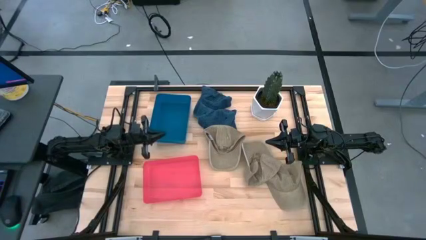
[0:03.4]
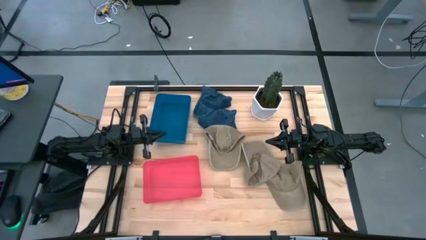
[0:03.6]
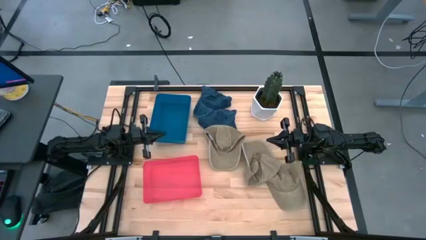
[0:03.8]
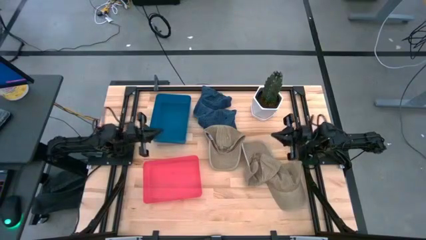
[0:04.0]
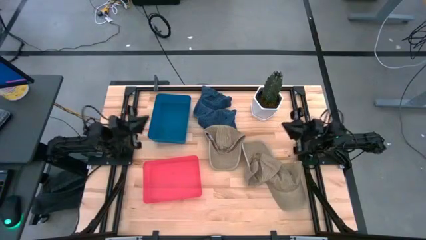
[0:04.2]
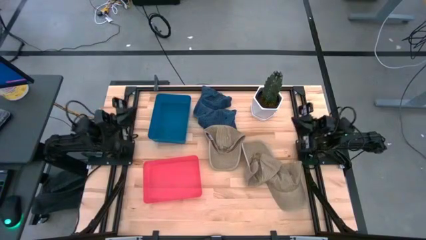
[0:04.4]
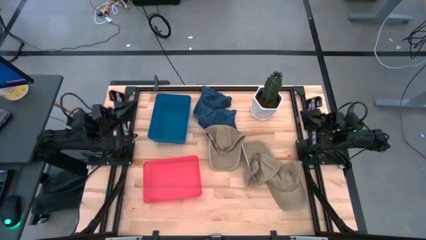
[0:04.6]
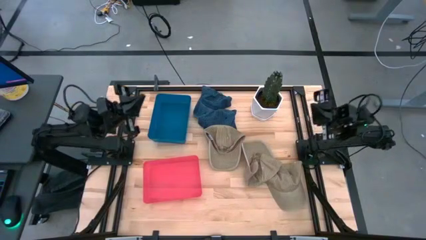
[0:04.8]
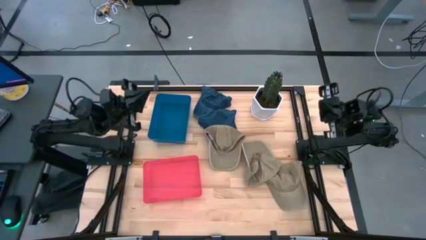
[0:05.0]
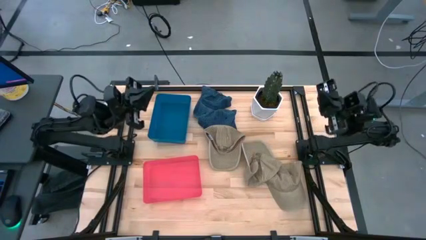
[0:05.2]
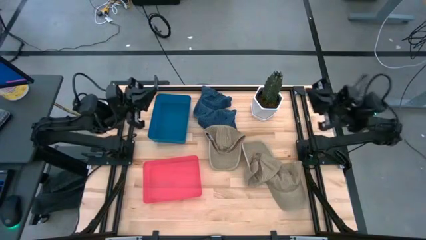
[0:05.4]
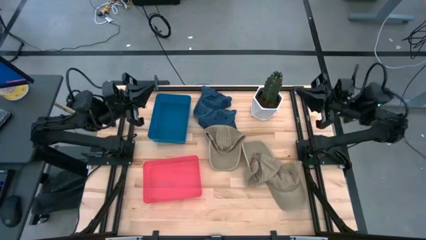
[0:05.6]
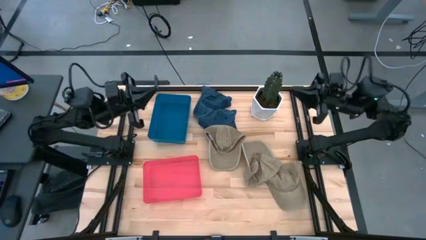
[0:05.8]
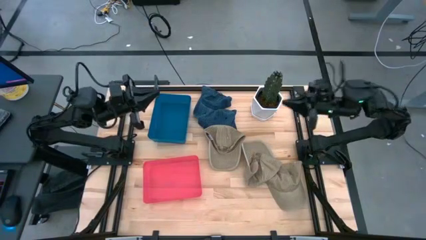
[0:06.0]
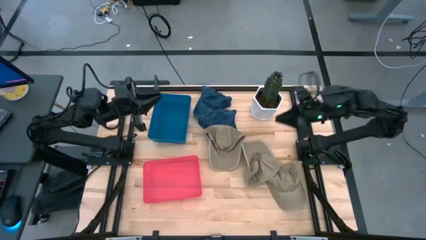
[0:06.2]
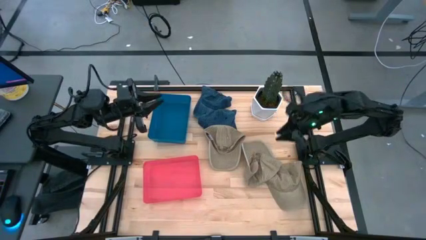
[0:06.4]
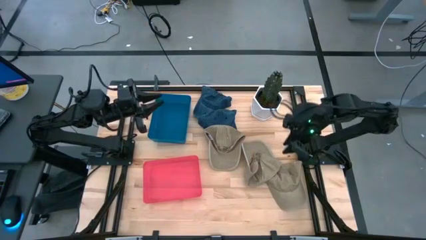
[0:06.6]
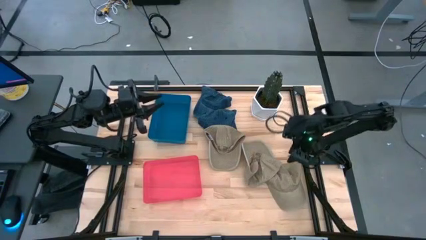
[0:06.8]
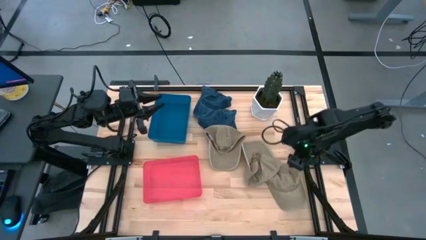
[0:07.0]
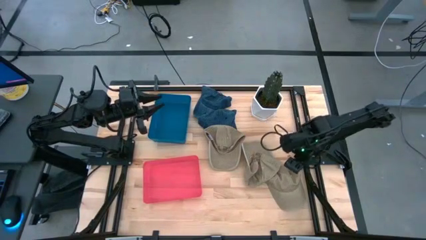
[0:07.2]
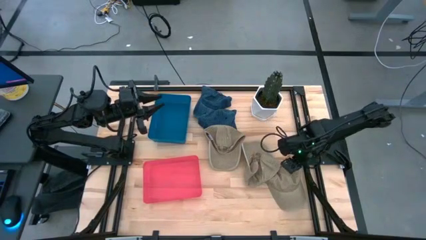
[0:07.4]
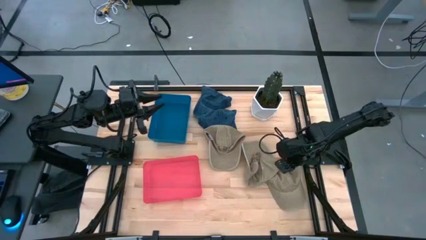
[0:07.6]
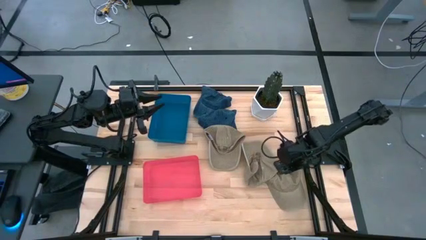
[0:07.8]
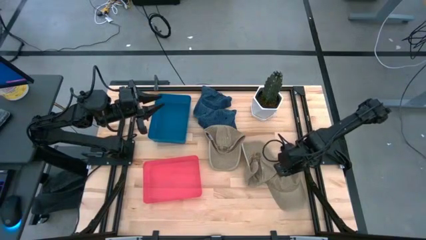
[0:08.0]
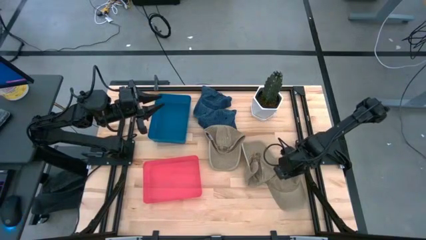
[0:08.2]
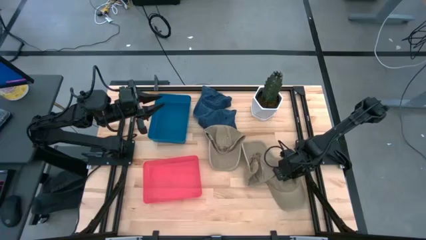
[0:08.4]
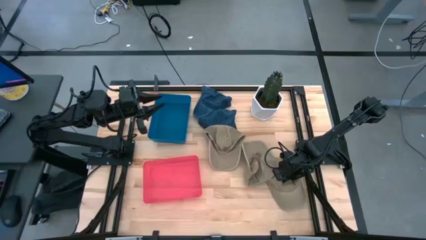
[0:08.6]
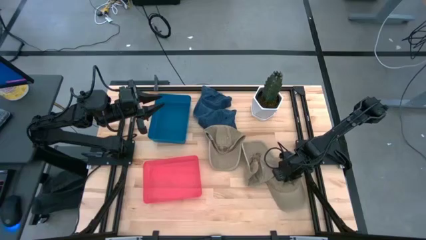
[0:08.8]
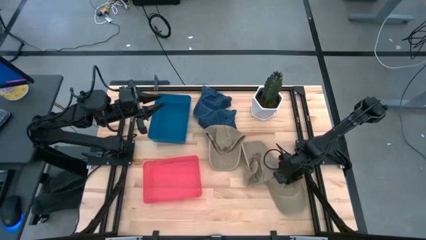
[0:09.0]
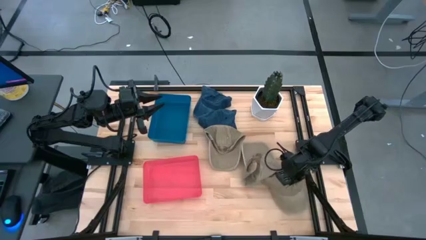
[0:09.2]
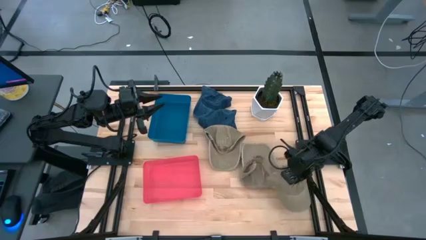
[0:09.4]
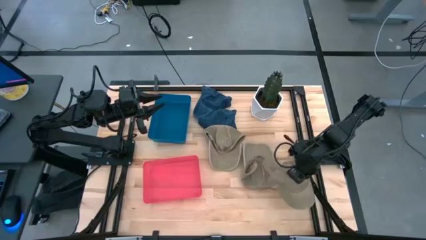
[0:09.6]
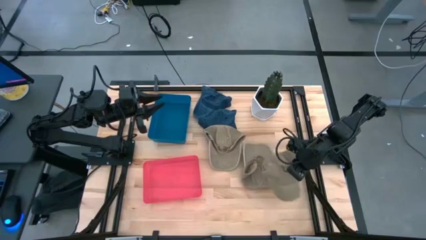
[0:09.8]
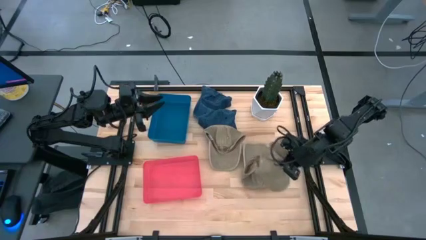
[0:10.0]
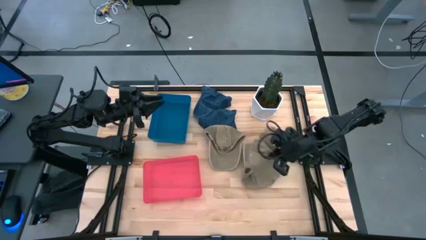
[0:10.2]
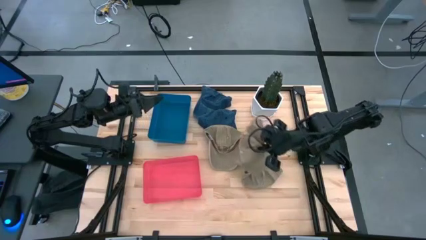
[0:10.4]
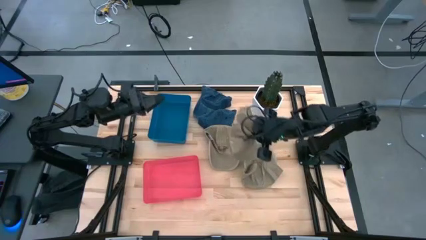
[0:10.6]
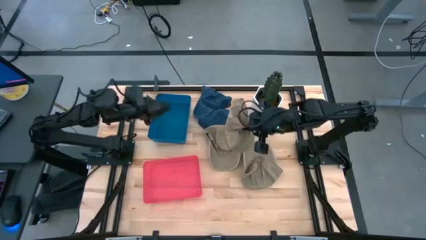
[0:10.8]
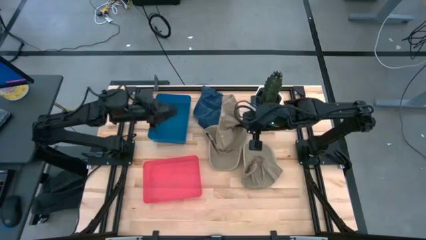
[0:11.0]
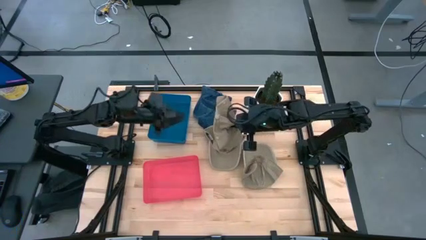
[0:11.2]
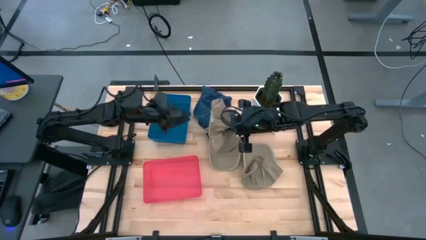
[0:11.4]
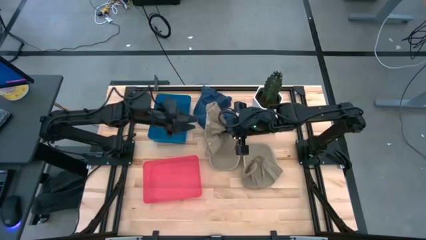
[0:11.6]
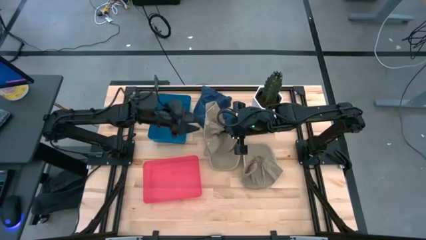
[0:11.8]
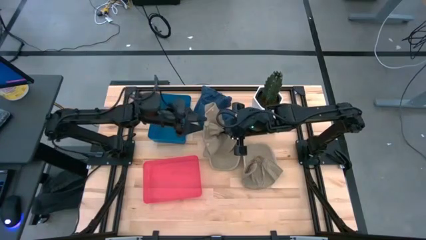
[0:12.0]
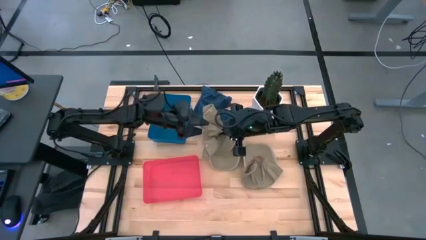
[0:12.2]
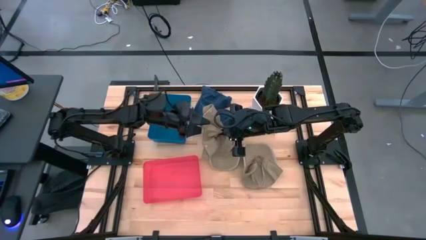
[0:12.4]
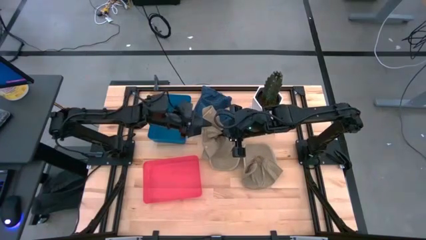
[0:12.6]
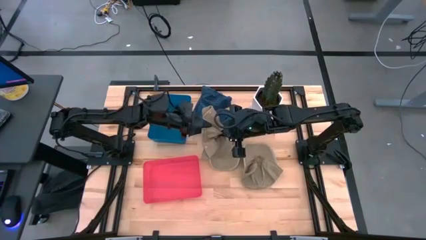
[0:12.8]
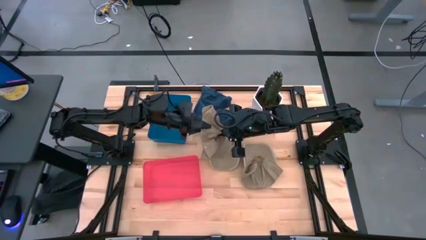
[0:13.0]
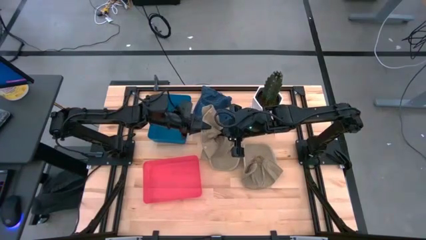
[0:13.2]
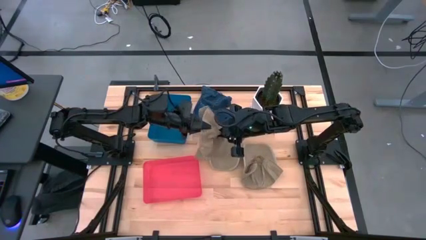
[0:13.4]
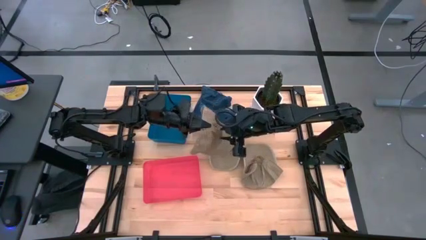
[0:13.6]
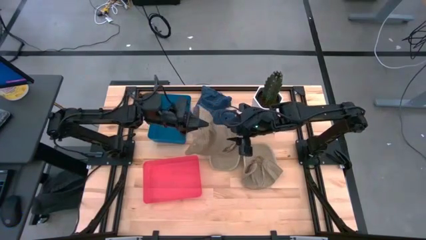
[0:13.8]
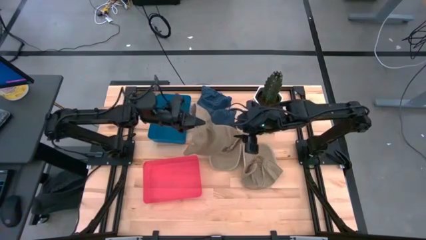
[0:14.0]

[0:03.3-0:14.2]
Task: Pick & Place hat
Put the bottom brown cap into the blue bin
